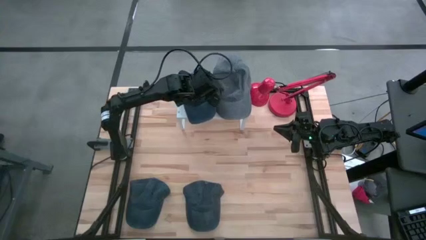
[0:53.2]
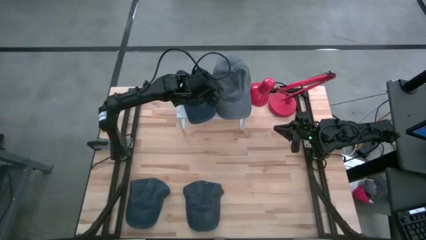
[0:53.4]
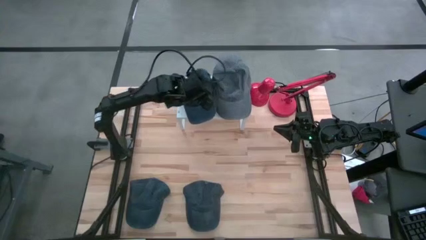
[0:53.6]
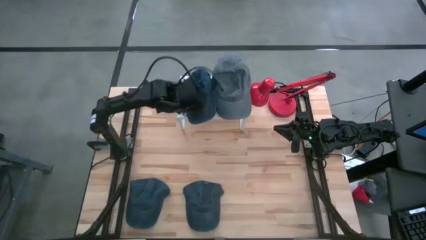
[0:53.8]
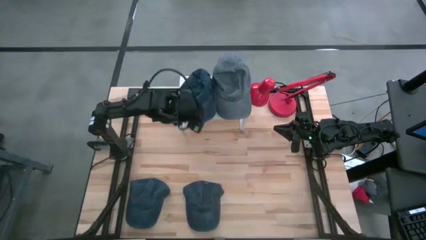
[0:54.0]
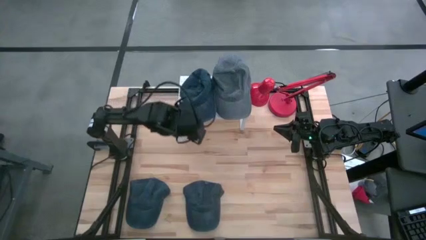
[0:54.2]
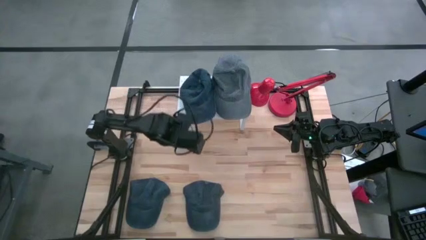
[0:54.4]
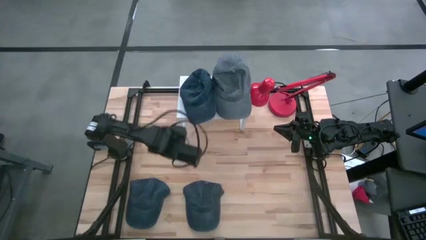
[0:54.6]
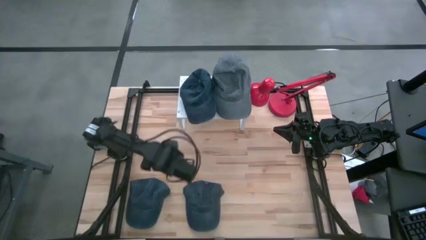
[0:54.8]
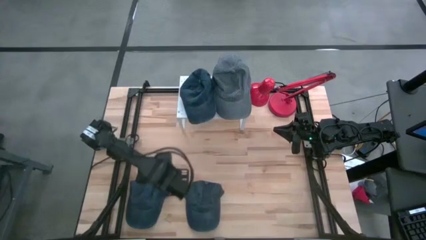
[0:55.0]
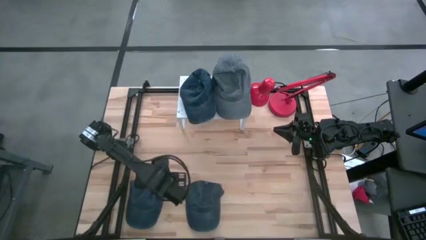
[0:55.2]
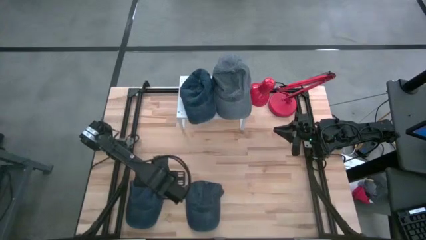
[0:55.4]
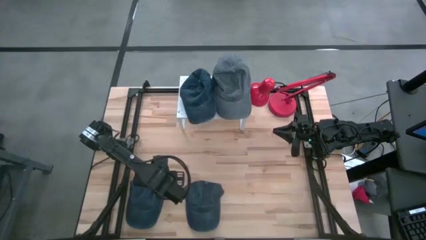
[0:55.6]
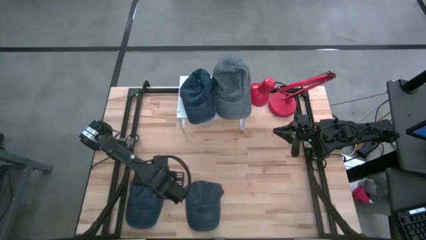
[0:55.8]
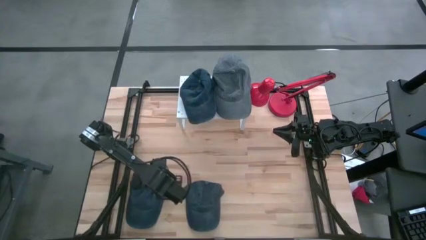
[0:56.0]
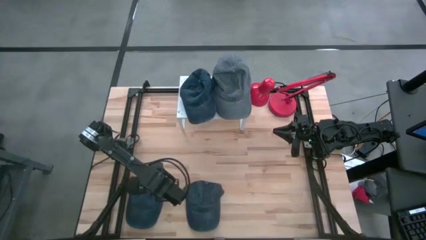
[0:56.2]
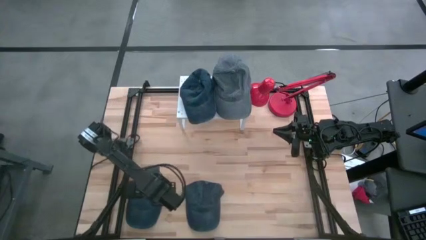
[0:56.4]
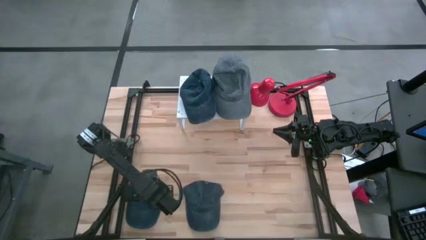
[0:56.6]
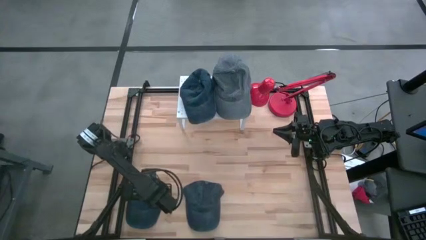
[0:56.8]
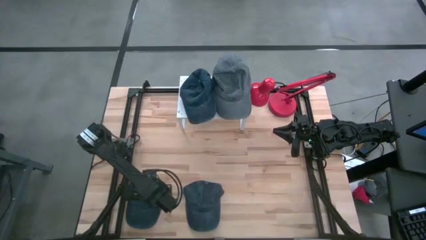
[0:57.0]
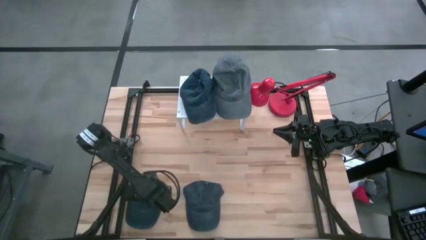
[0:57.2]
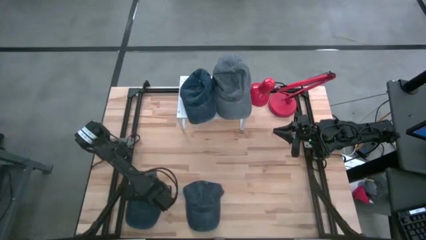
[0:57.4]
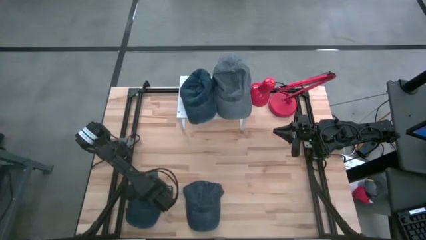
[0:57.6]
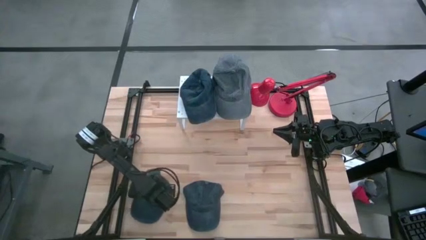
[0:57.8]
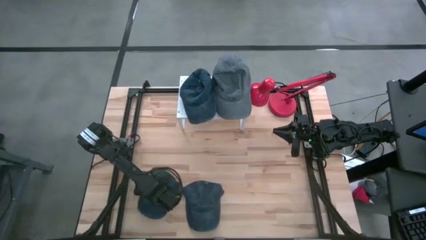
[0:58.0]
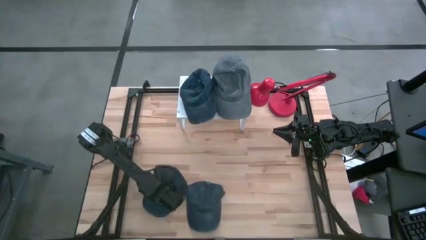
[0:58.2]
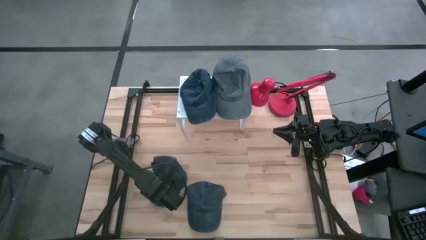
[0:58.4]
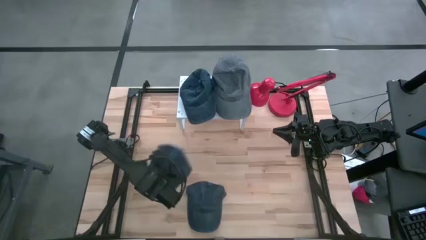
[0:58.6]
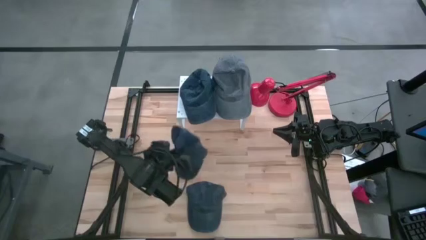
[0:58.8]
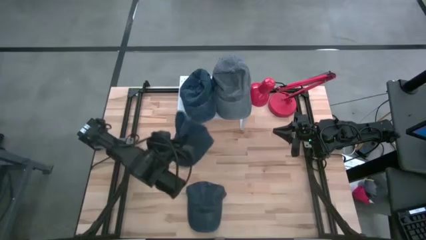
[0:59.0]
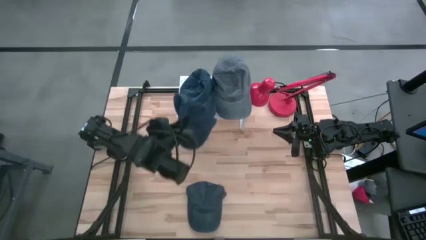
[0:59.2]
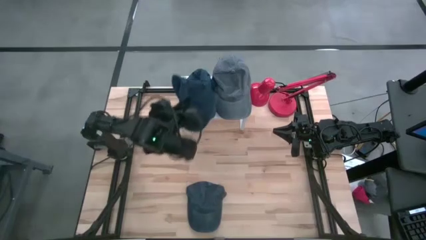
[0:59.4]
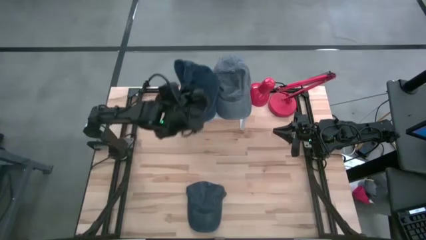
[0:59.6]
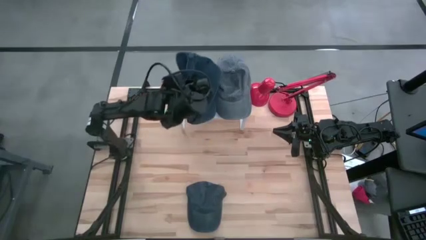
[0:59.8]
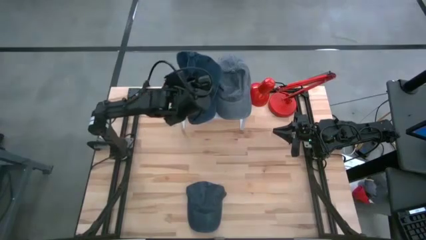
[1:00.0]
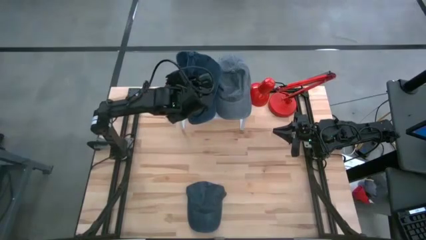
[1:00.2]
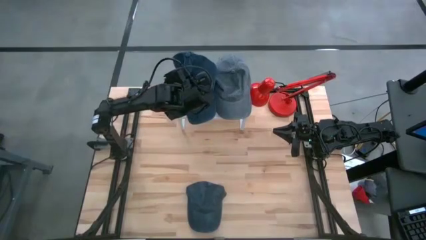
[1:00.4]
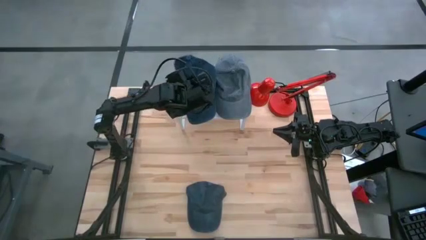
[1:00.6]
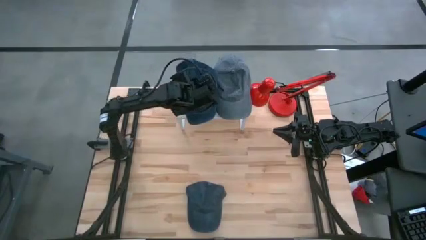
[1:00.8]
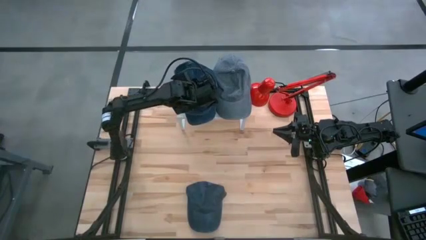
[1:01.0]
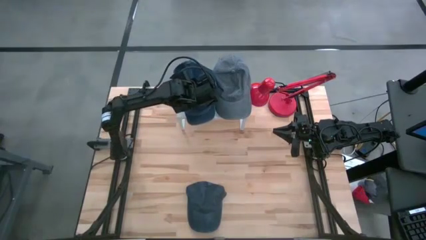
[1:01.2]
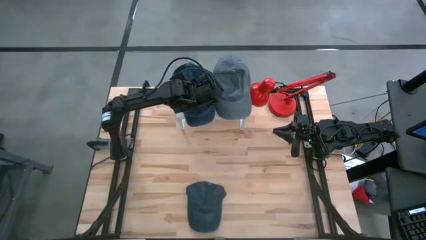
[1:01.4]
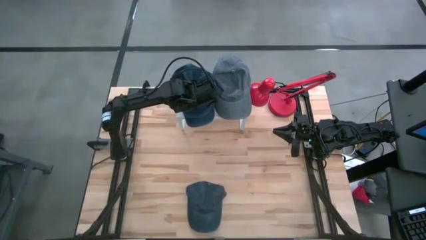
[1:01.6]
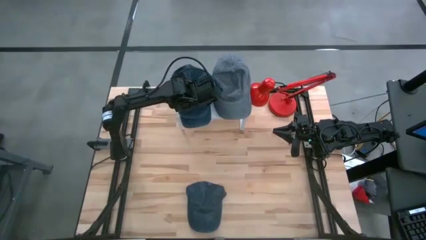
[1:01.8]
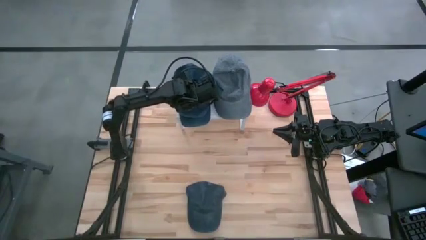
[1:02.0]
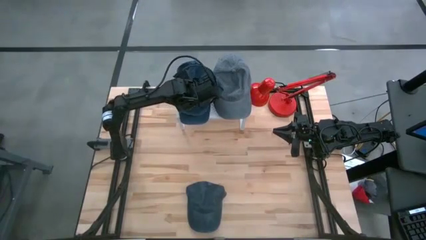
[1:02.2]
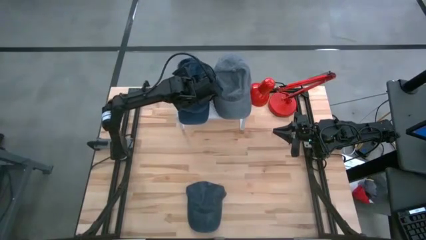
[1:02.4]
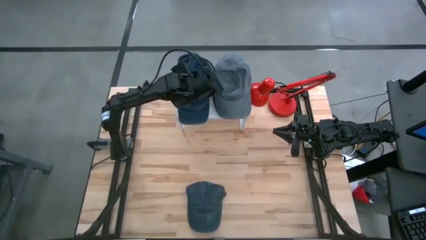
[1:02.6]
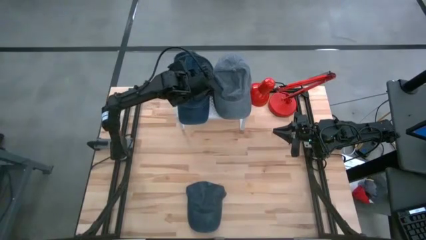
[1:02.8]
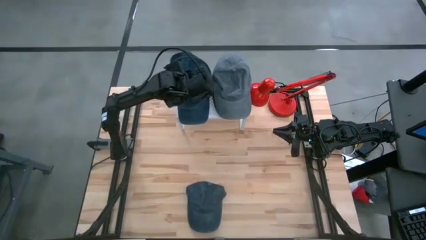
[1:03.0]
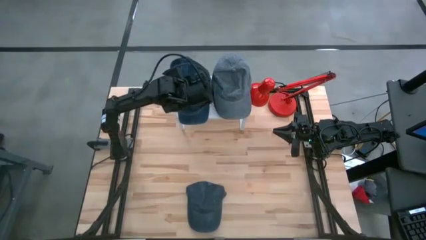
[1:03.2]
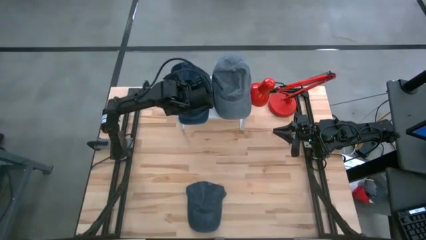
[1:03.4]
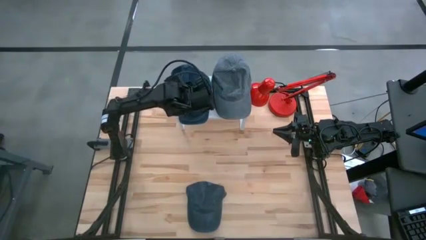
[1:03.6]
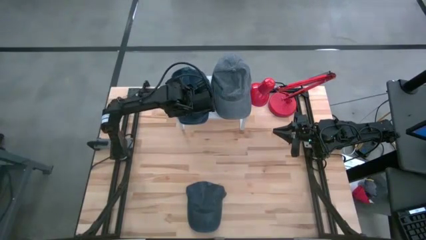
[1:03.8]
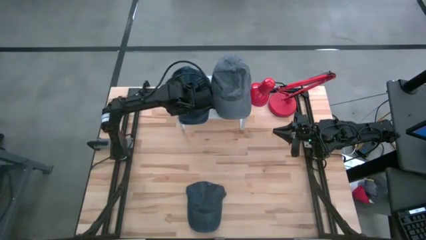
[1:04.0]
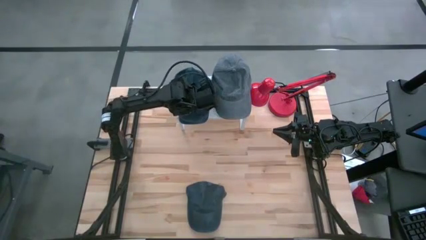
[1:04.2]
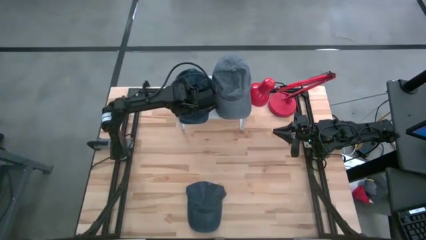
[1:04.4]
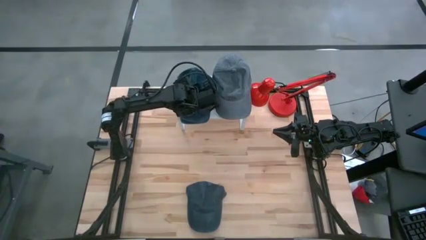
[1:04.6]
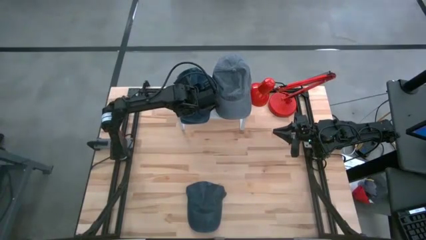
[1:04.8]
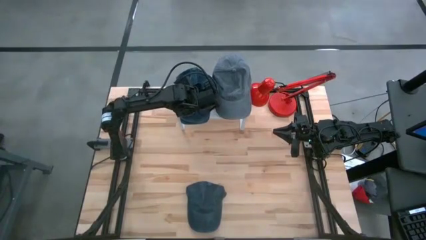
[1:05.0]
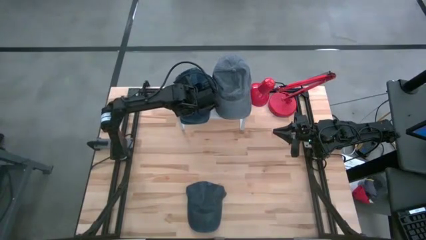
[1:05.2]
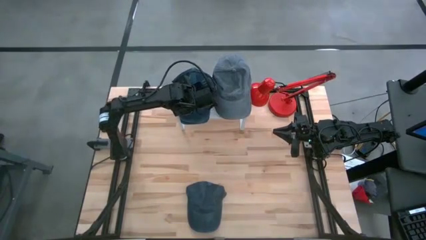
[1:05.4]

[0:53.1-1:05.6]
Task: Pick & Place hat
Stack the left blue cap on the blue cap on the shelf

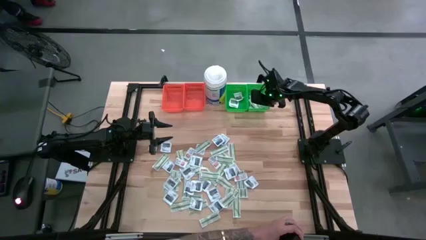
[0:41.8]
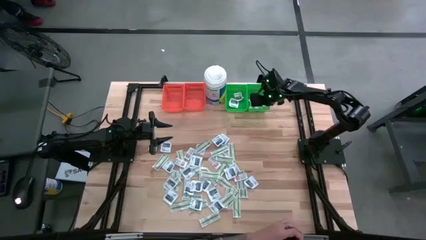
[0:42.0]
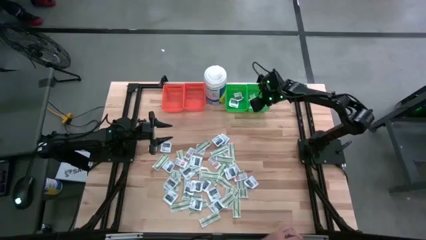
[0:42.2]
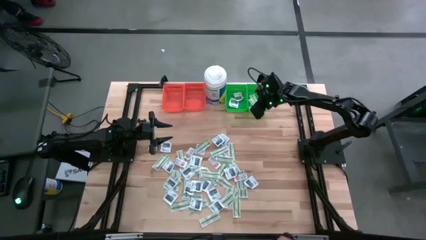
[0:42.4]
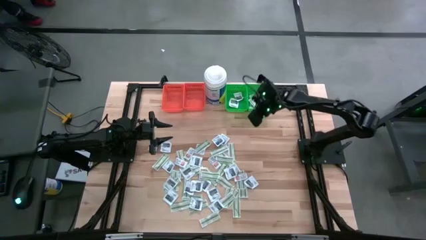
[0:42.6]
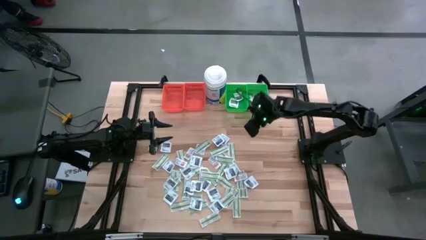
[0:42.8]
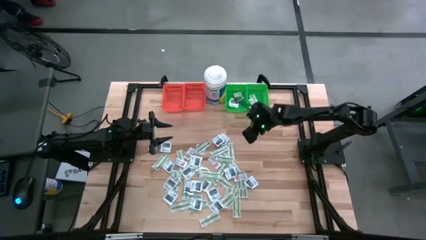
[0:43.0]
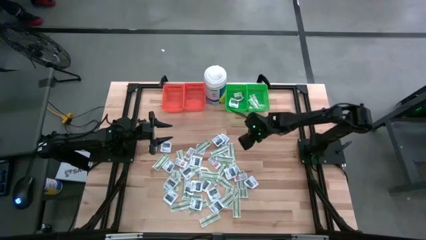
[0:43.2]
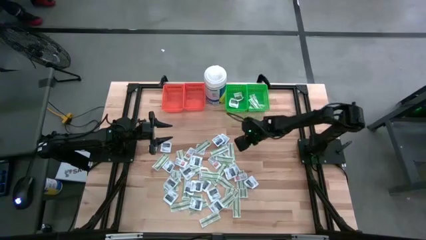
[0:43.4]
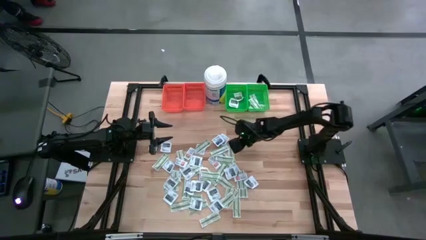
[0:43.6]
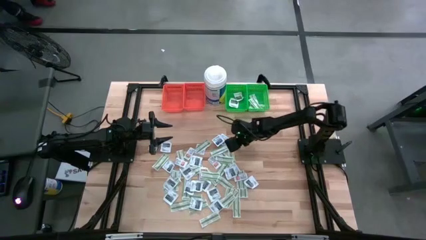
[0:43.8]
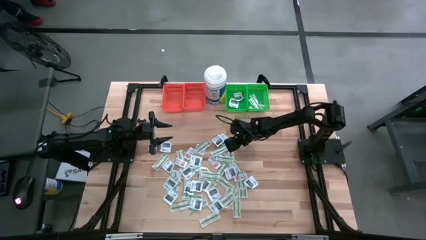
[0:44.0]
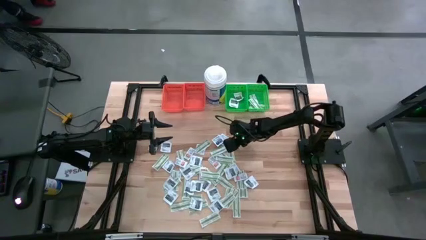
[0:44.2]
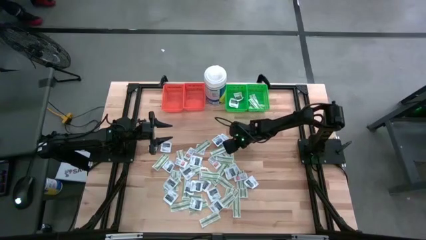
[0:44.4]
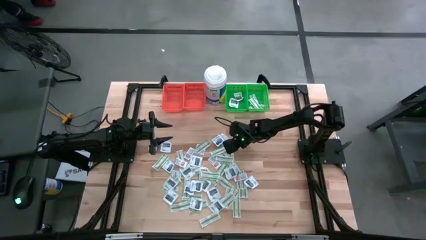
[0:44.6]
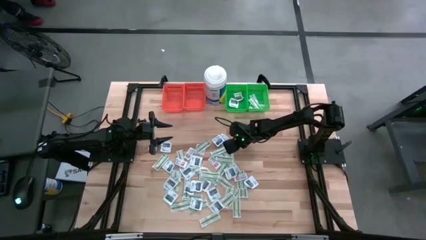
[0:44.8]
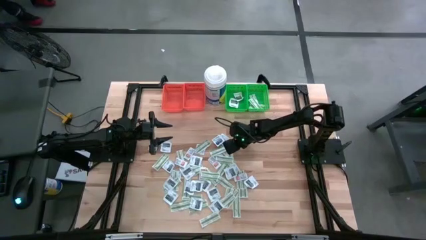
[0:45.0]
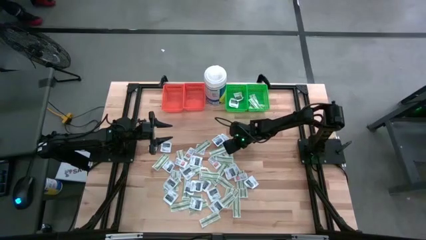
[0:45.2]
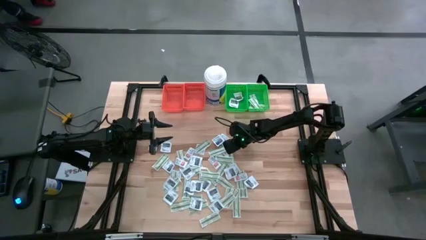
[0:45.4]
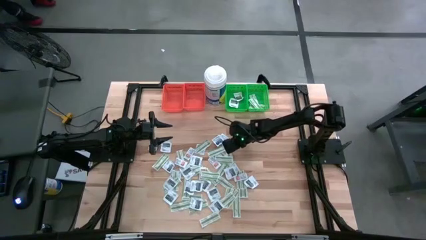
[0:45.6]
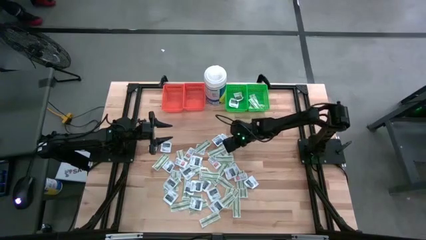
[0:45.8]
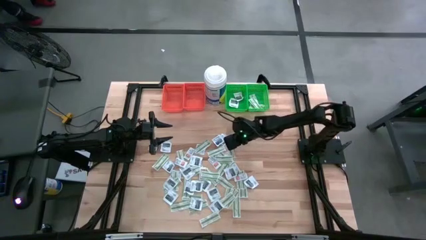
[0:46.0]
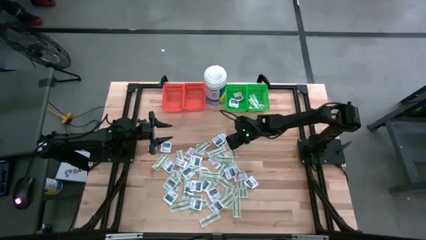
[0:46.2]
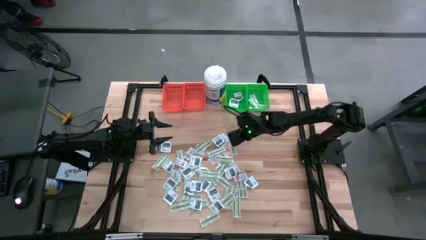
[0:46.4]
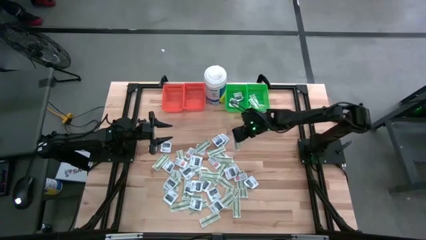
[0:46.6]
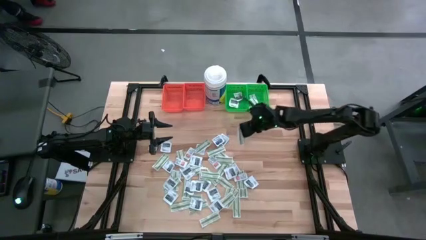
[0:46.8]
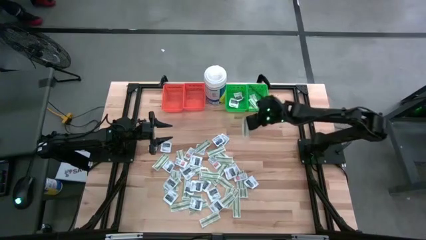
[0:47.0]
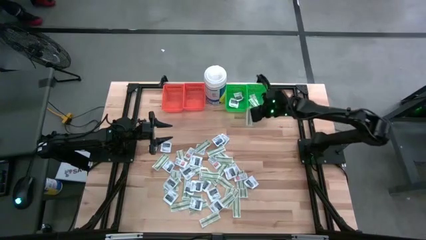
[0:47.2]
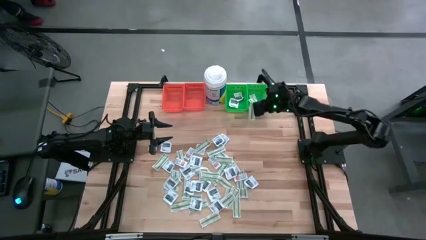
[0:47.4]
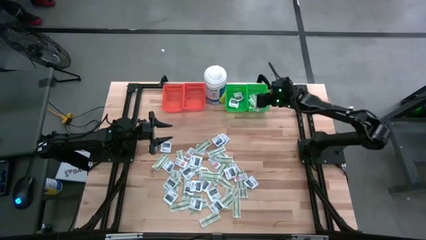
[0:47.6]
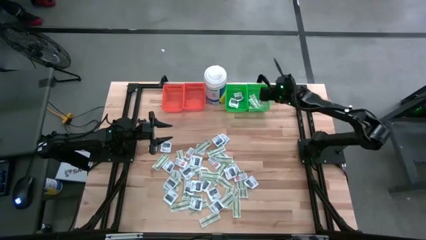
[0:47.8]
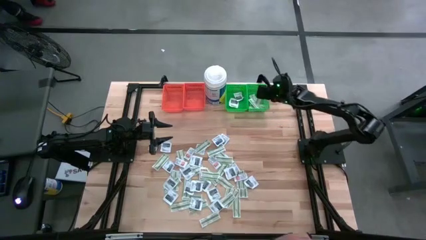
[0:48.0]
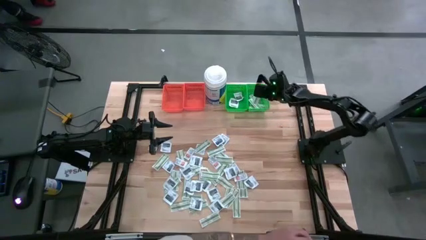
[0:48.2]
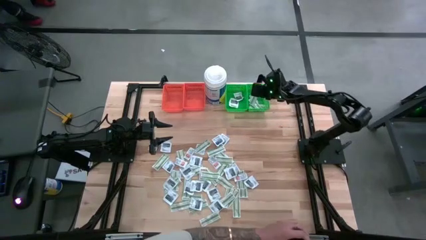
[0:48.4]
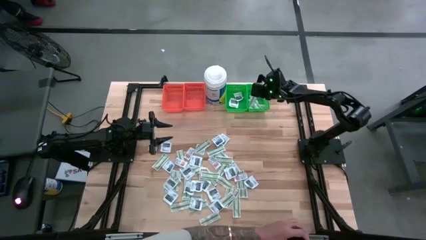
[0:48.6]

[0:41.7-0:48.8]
Task: Pick & Place First Aid Supplies
Put the green bandage pack into the right green bin
